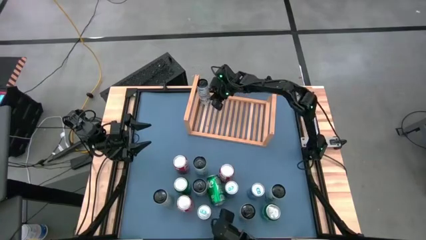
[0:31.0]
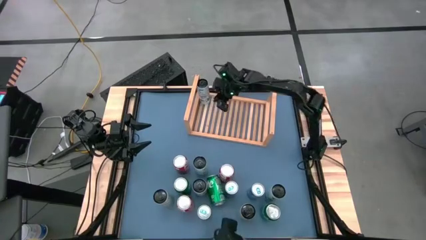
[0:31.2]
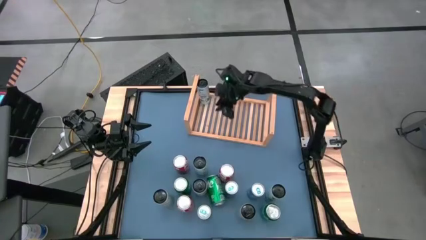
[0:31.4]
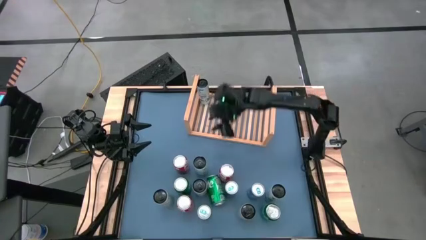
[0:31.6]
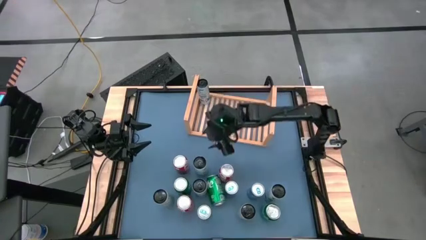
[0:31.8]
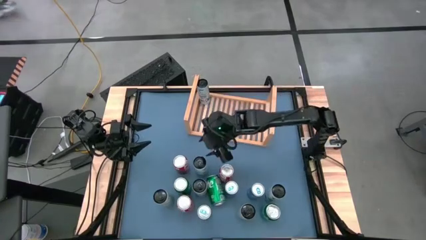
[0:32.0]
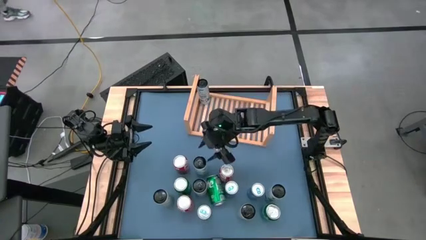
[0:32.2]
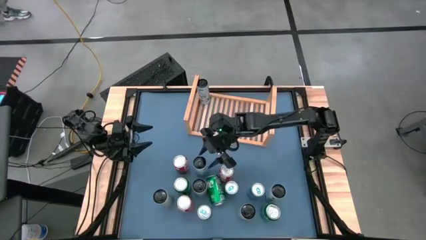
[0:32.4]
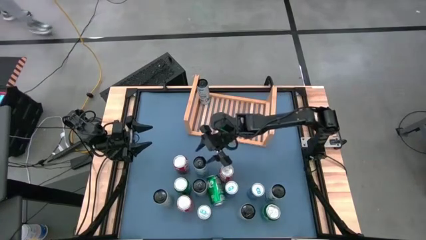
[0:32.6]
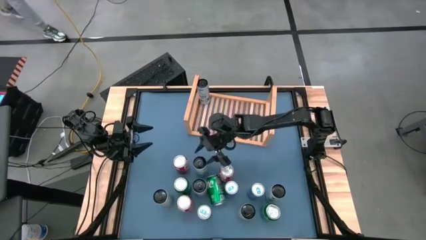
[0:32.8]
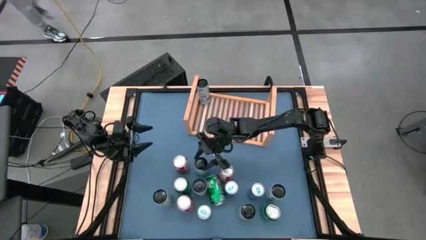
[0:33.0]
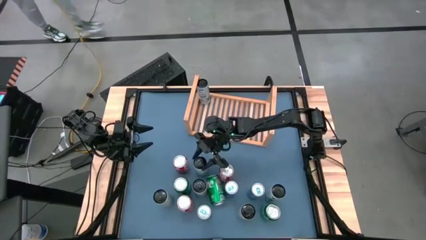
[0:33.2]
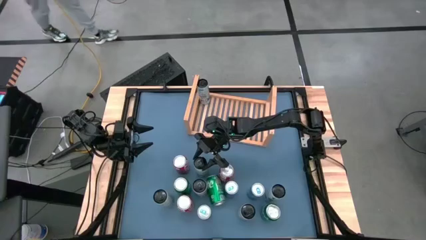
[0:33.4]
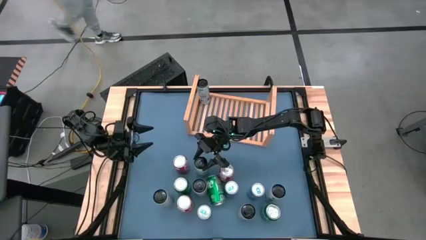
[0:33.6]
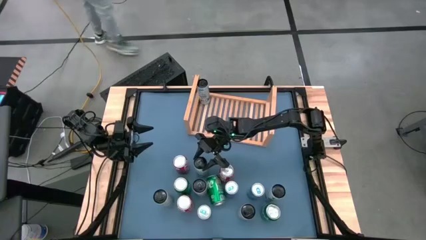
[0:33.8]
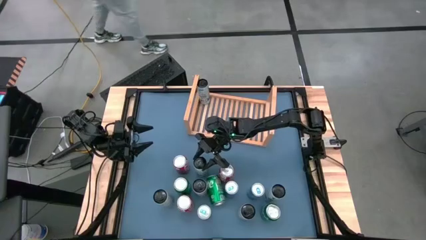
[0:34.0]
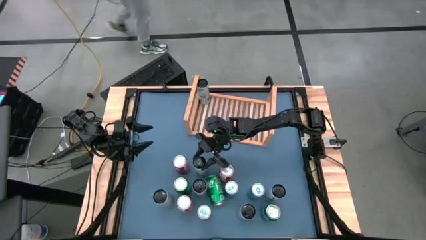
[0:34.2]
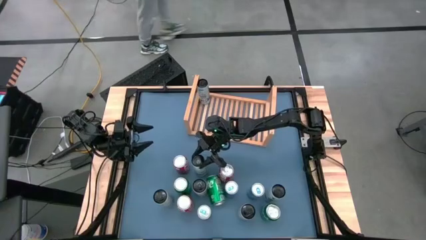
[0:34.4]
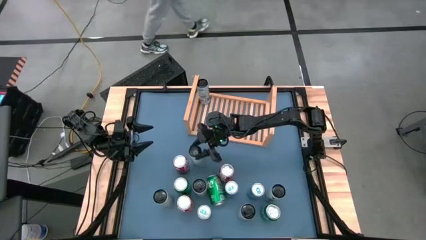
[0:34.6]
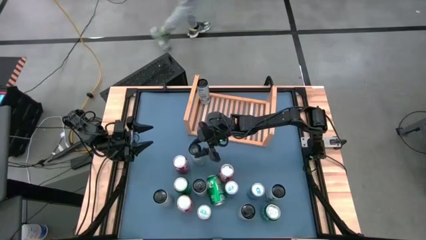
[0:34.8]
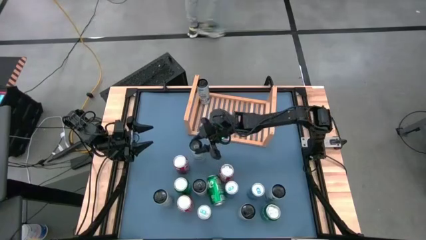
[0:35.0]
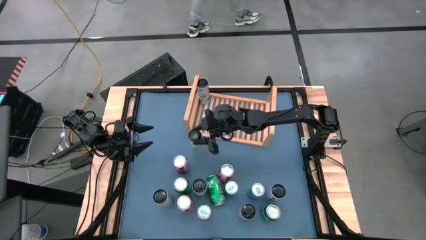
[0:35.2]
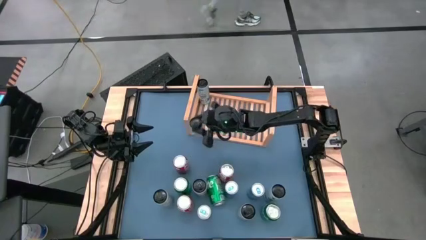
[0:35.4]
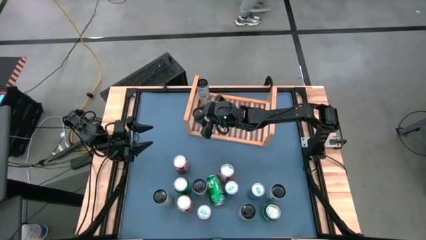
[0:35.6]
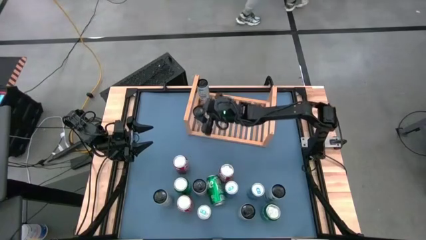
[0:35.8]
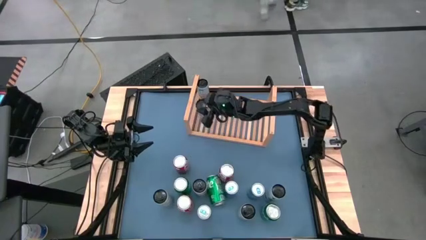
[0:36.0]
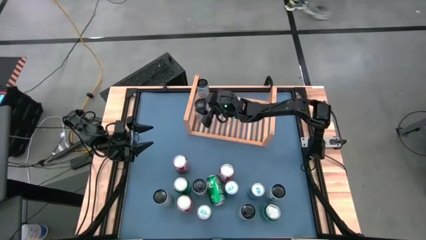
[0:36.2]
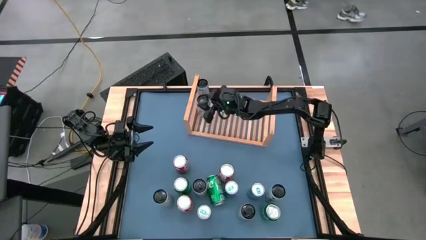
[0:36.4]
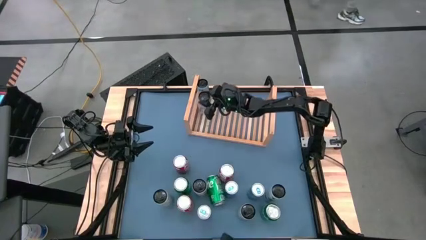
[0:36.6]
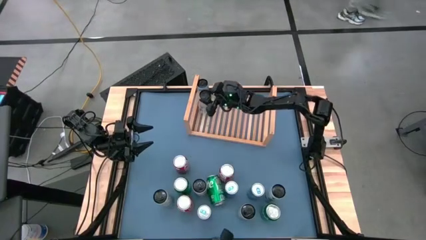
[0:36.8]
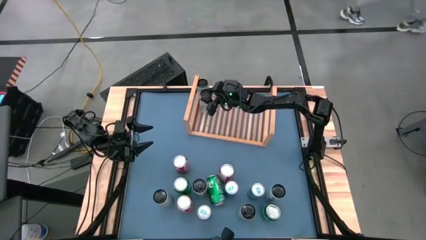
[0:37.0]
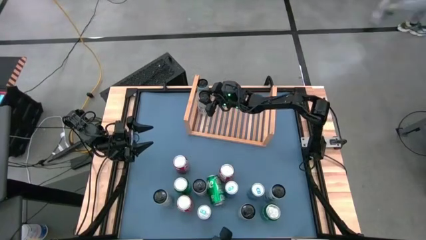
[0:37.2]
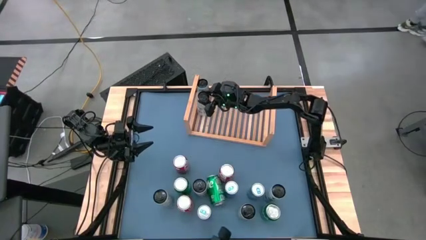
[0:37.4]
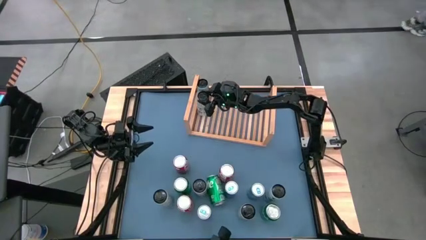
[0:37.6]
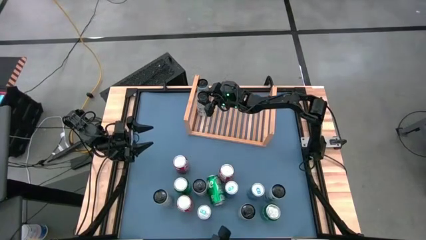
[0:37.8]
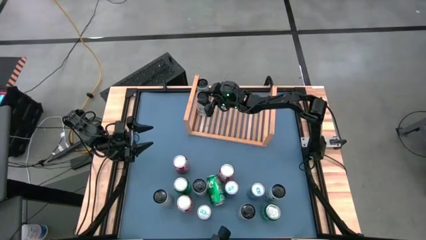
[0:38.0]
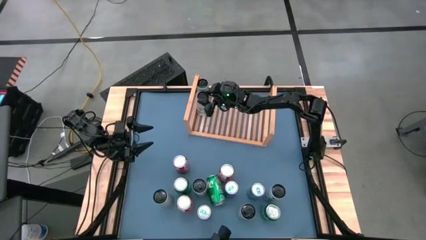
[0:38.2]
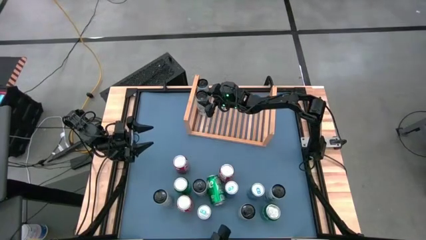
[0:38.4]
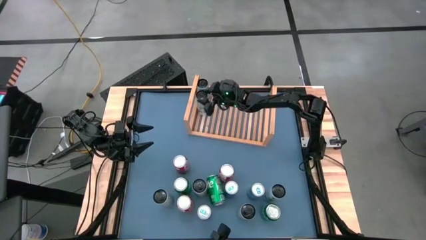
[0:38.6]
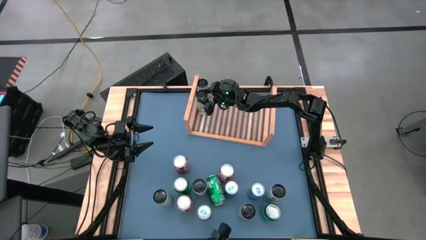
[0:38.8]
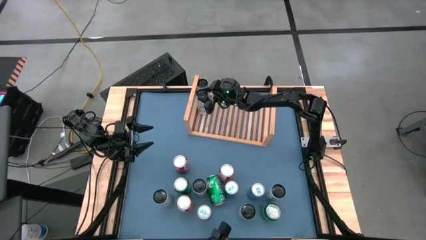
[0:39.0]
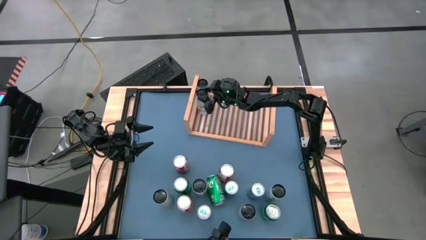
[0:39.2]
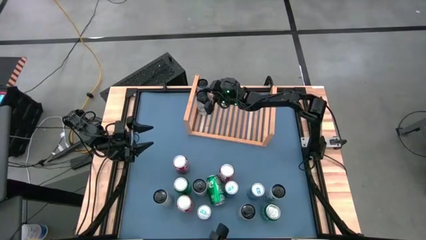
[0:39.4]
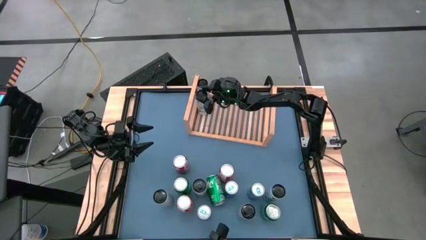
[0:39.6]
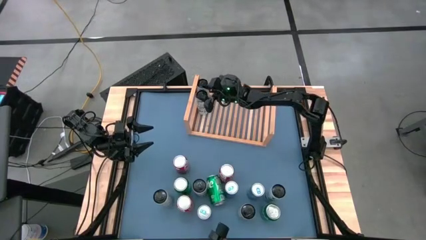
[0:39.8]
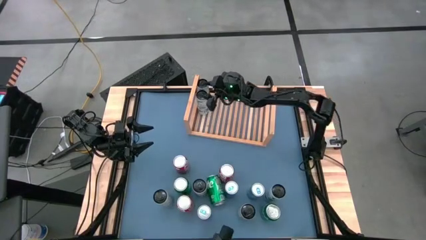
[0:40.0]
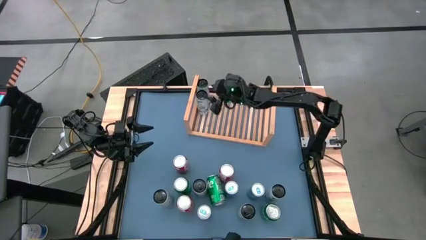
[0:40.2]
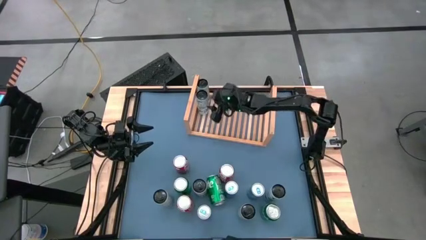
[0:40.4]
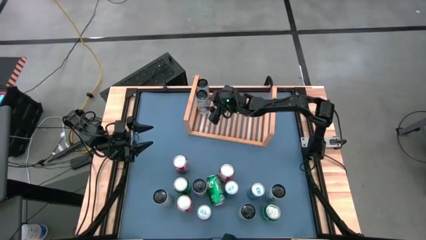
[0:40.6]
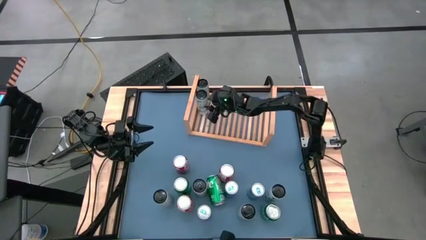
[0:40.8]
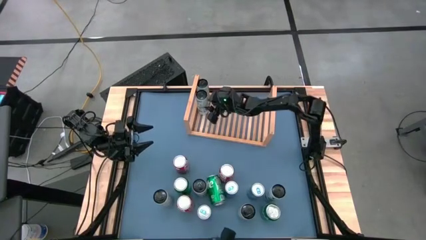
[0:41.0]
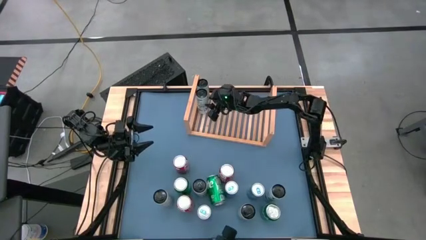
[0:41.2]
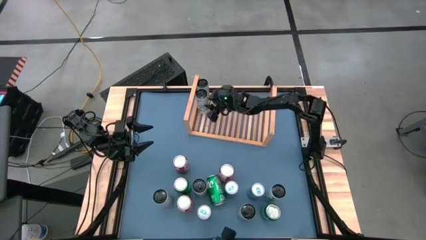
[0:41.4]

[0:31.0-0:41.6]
Task: Place canned beverage on shelf
Put the white blue soda can on the shelf aligned with the other white blue soda can

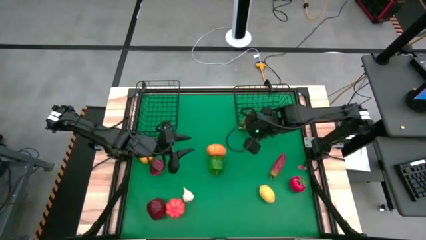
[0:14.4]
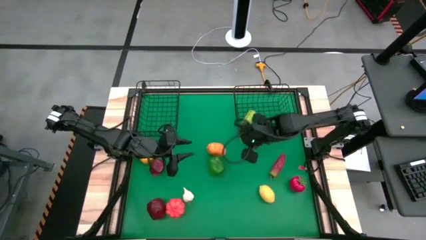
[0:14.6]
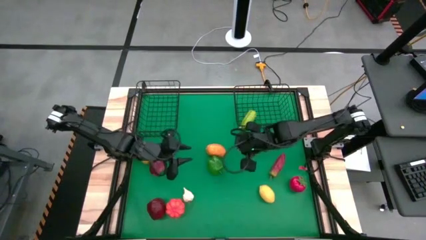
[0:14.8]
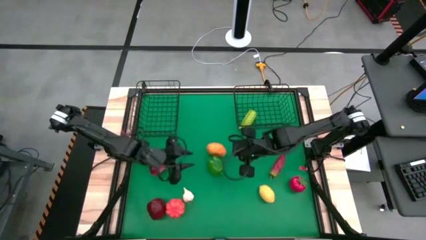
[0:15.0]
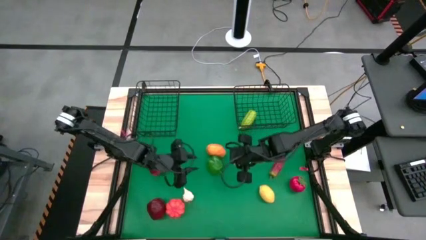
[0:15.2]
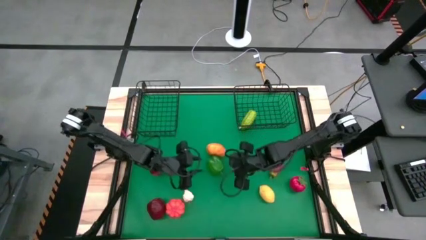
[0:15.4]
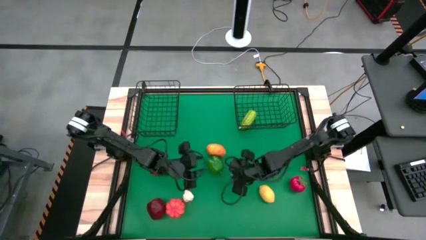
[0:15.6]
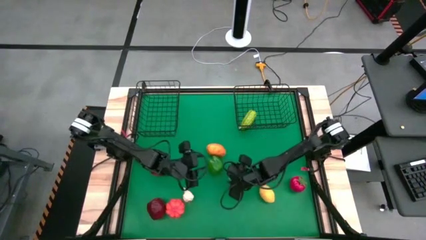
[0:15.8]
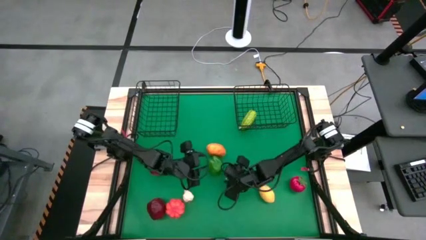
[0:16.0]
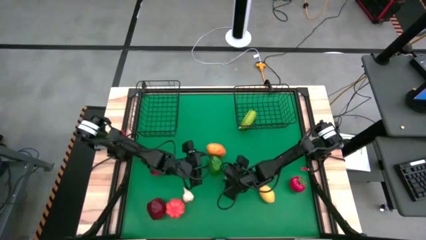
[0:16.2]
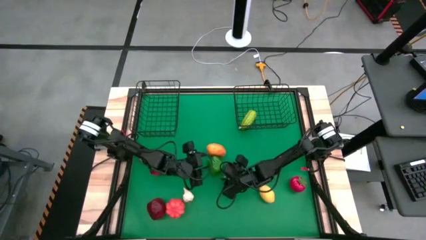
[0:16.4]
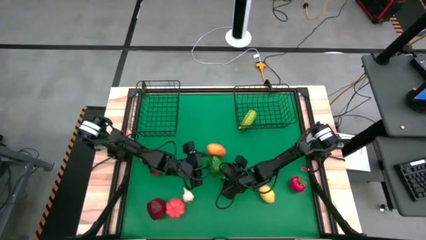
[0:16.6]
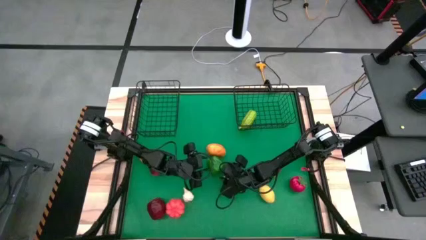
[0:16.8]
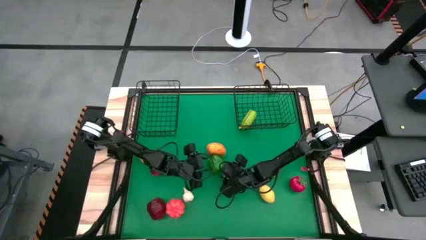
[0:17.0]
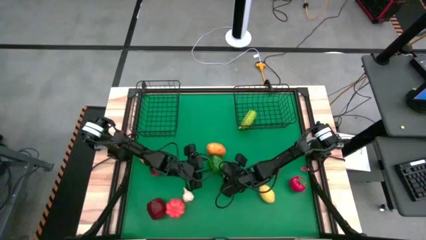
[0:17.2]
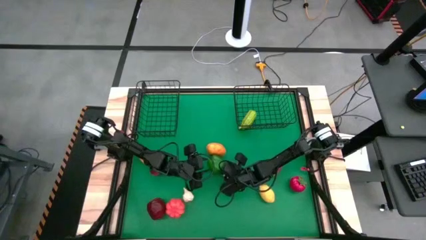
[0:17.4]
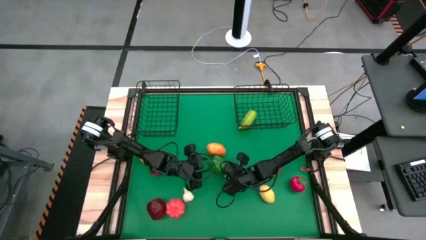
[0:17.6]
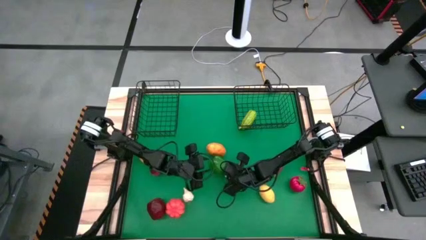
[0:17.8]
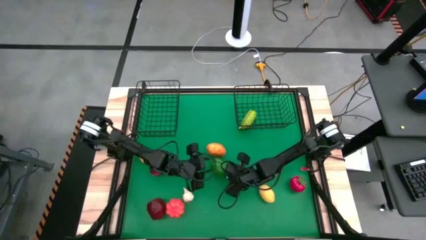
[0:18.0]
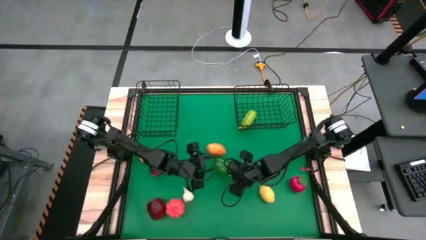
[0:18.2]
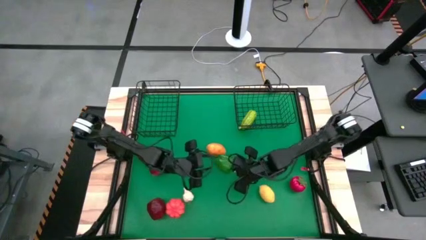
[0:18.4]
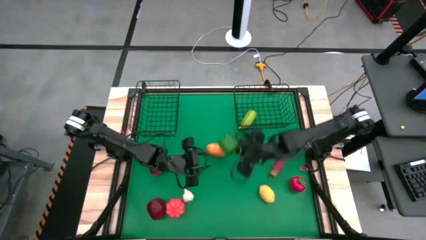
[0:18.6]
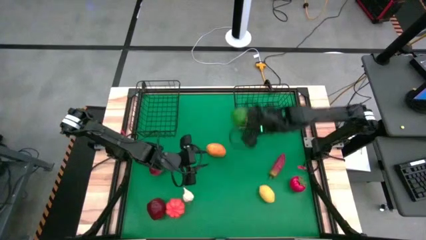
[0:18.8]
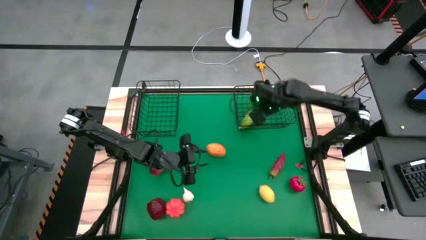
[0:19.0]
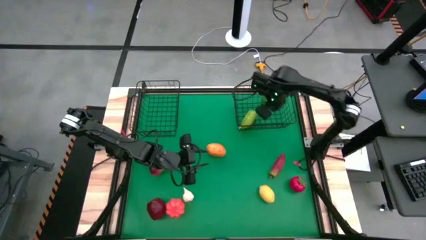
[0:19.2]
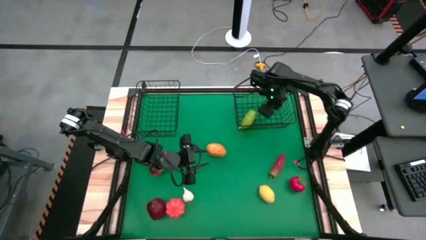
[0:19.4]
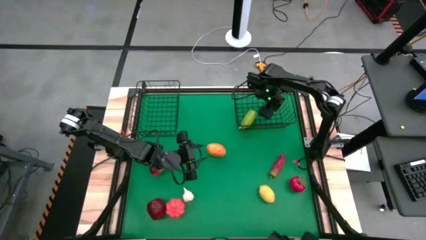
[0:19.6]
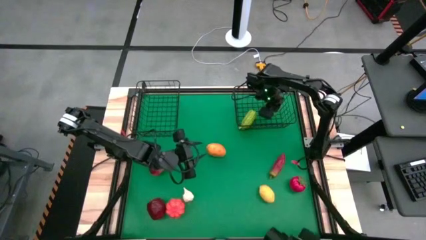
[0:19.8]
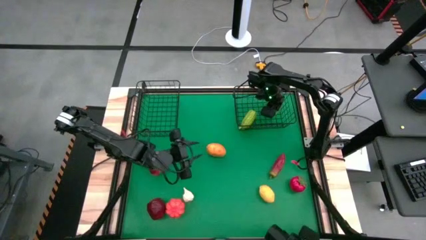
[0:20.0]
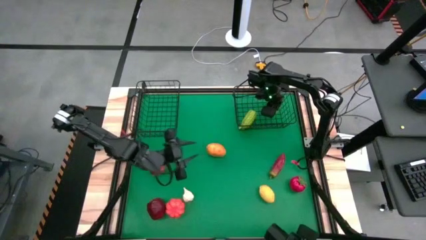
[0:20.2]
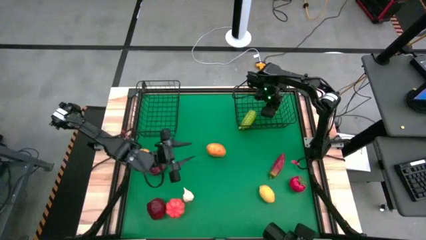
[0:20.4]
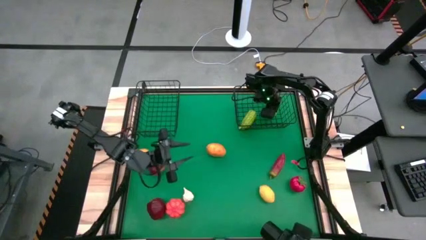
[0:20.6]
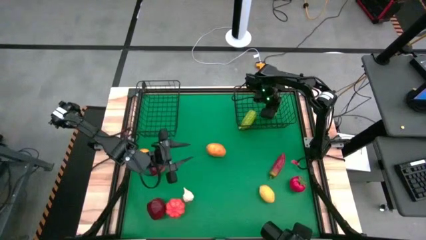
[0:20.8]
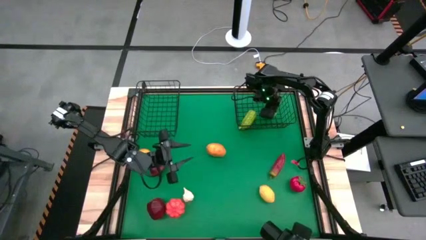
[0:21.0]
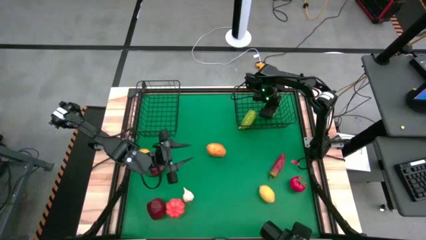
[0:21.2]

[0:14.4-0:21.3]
Task: Sort produce into baskets
Put the green bell pepper into the right wire basket
